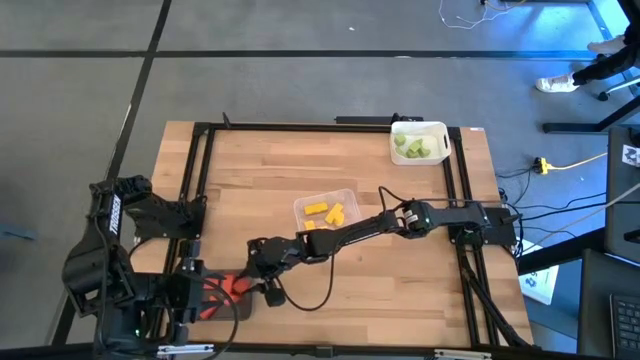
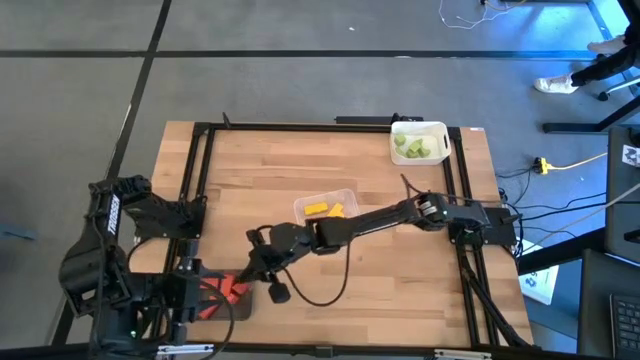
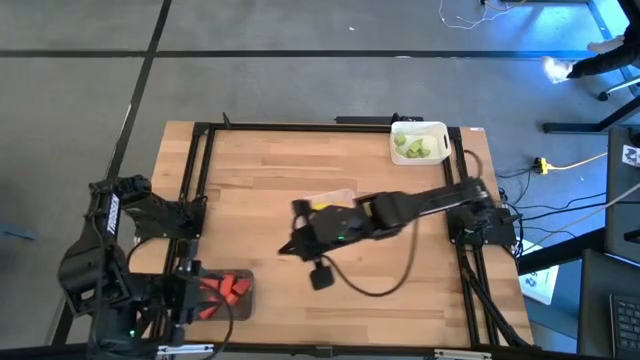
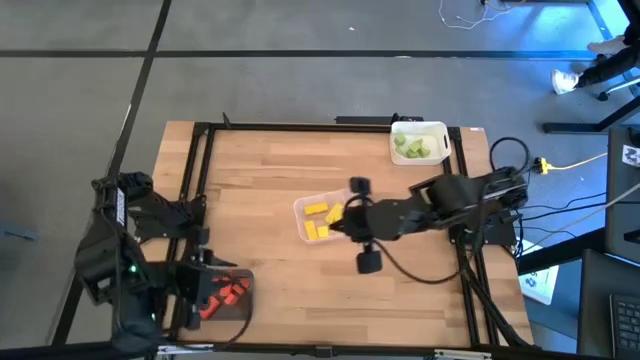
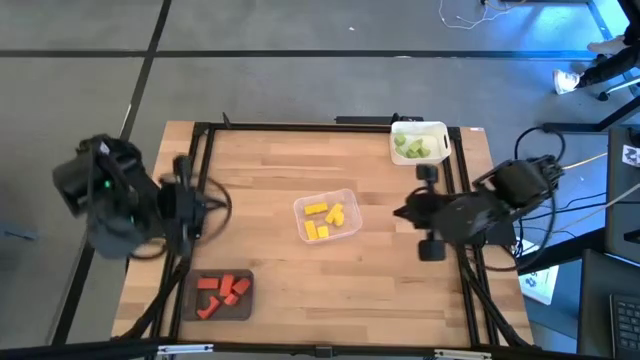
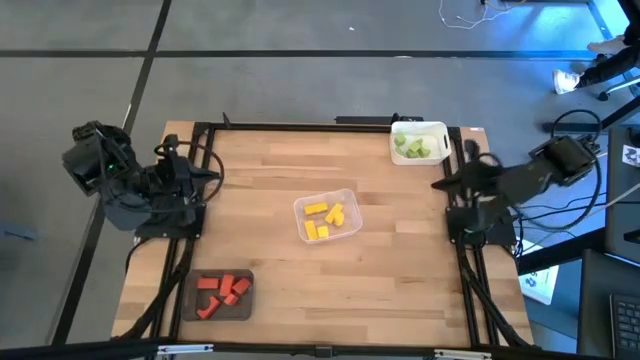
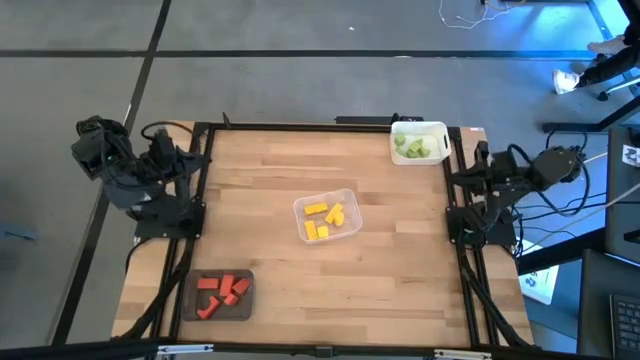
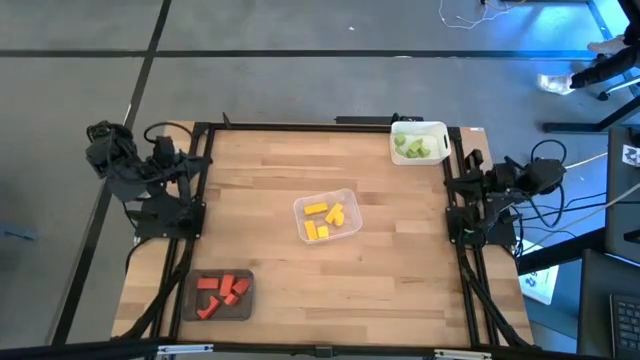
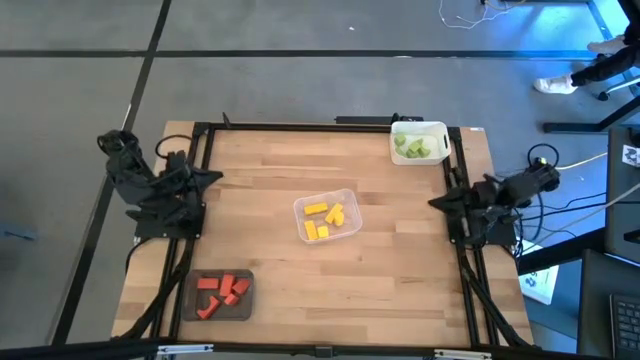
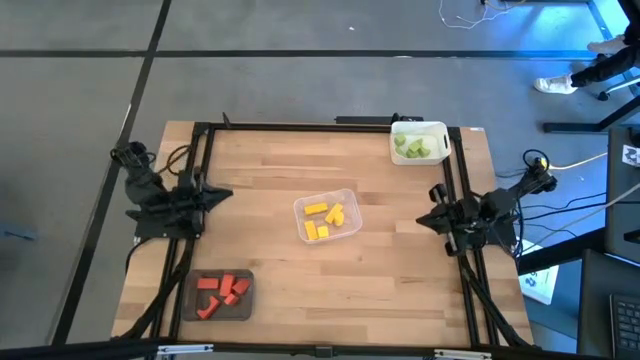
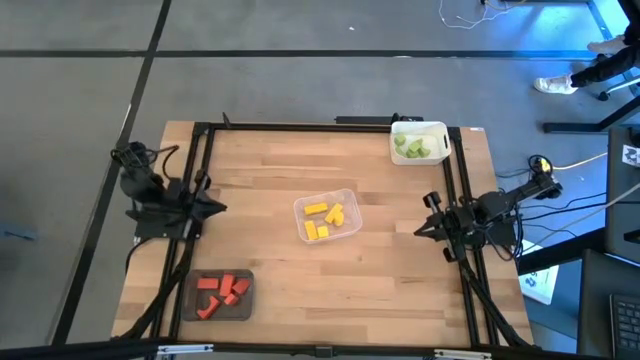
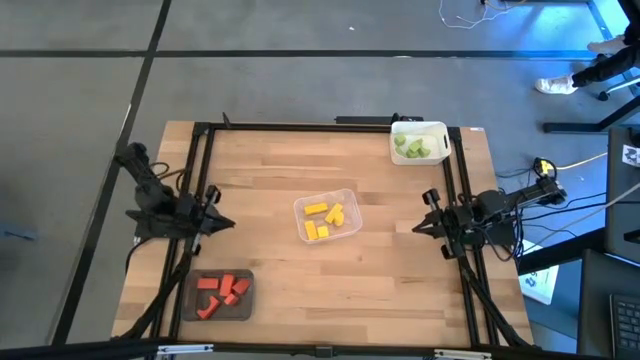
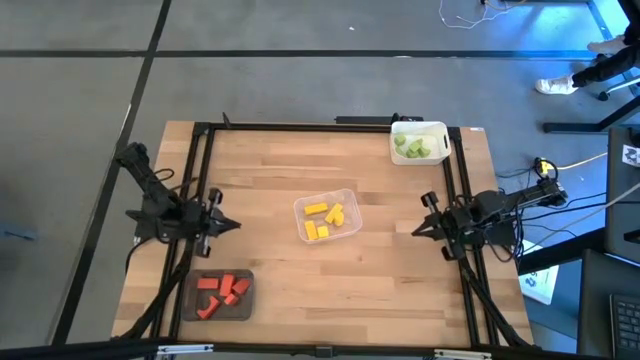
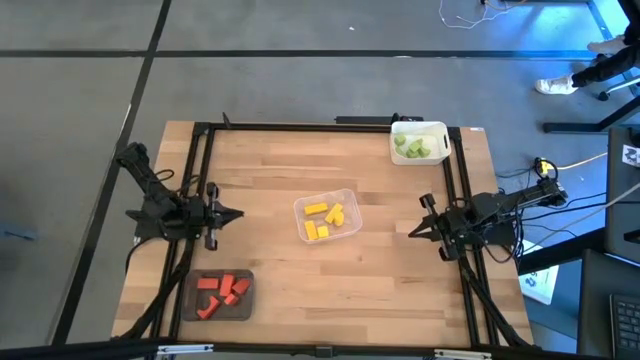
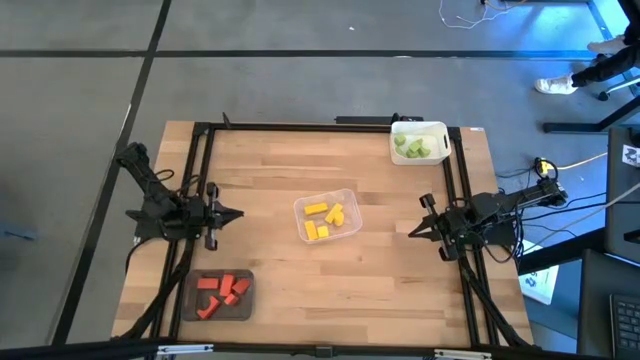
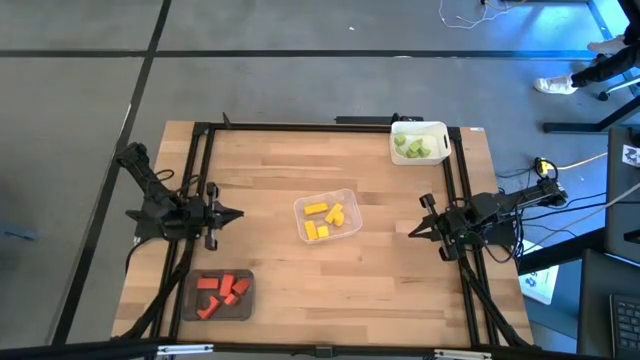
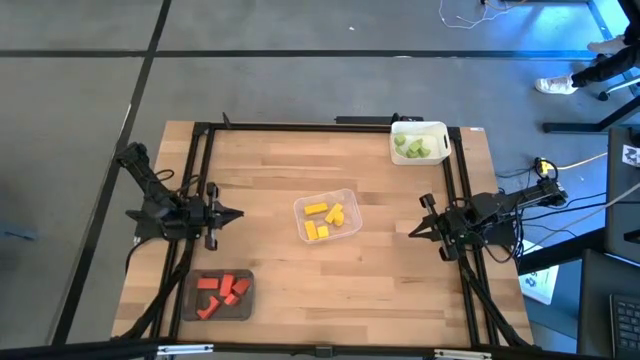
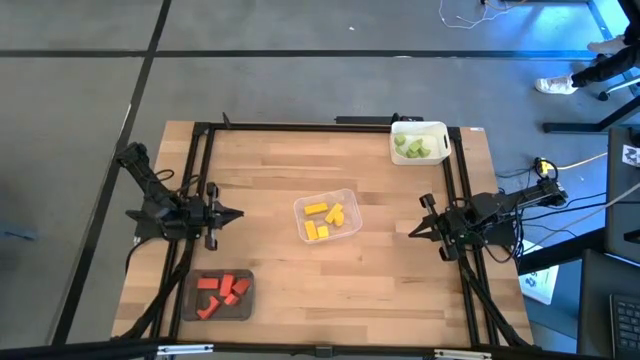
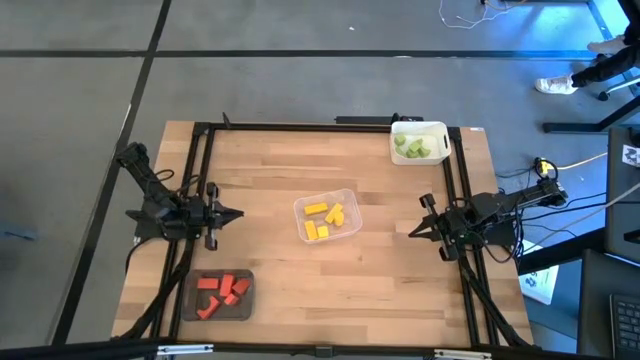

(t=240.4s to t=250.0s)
Task: Sort & place blocks by color
Return to Home Position

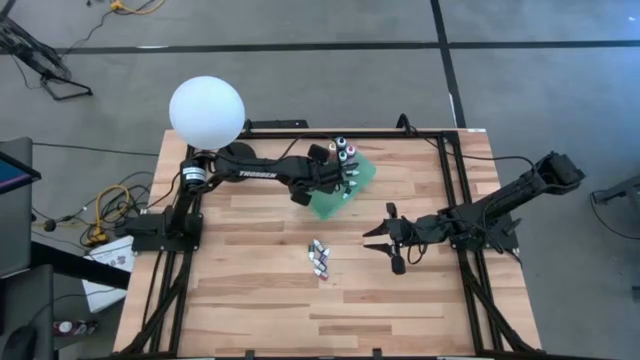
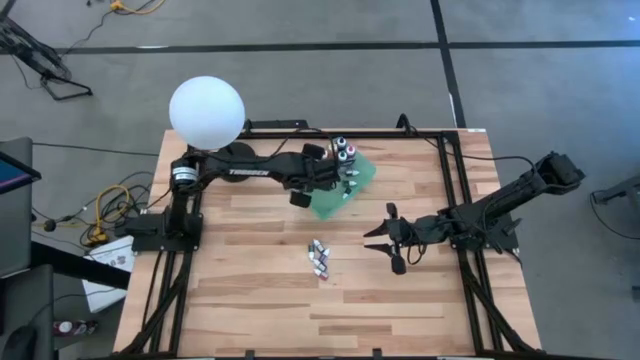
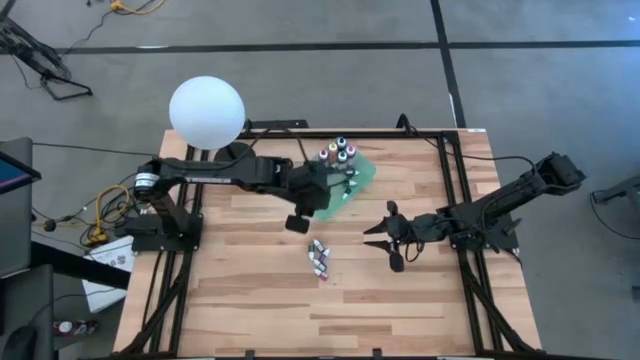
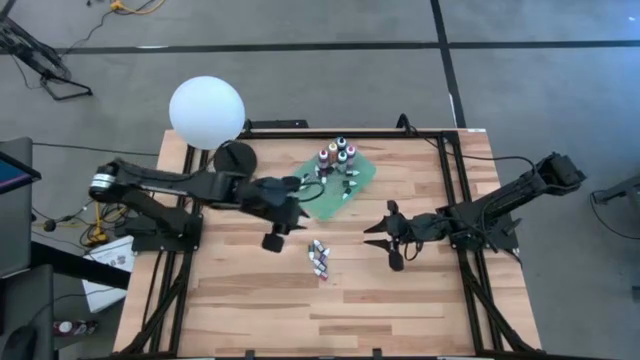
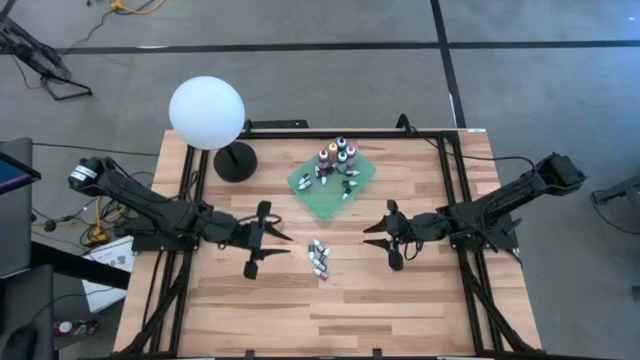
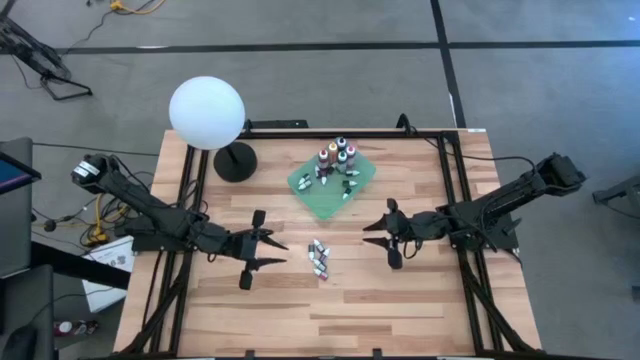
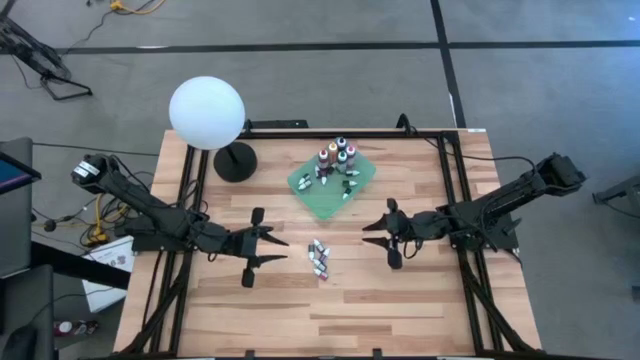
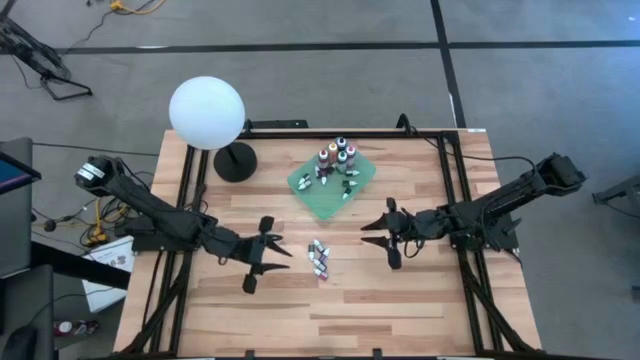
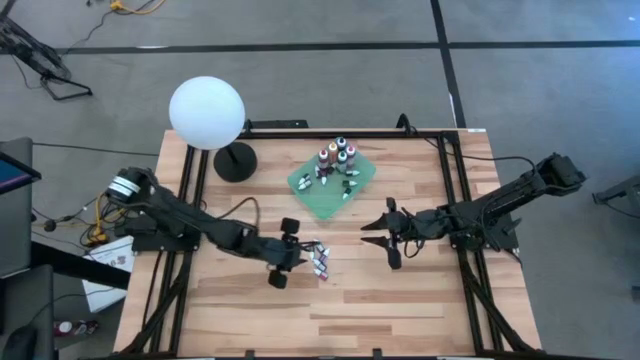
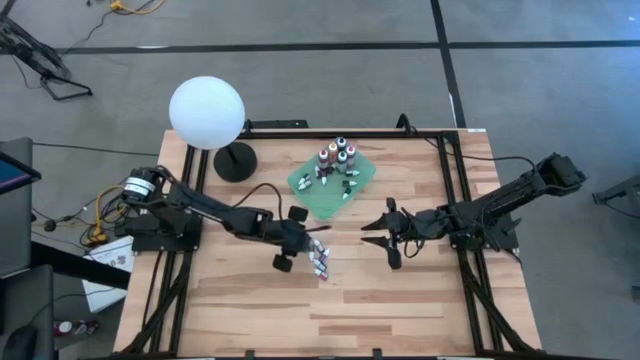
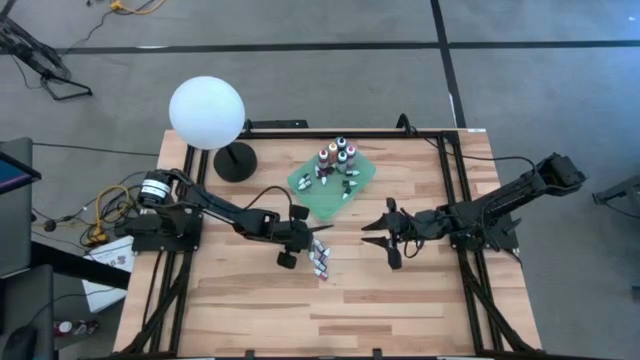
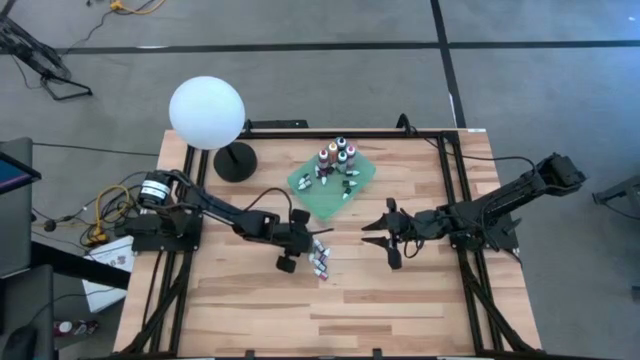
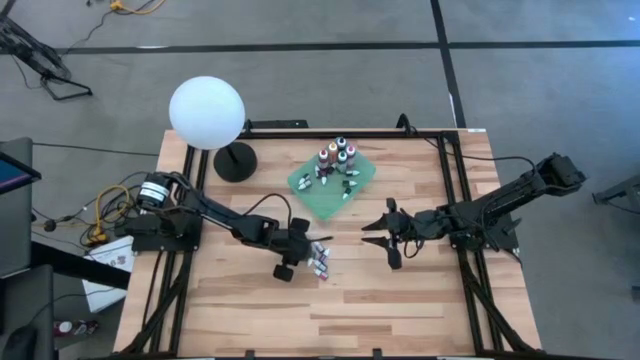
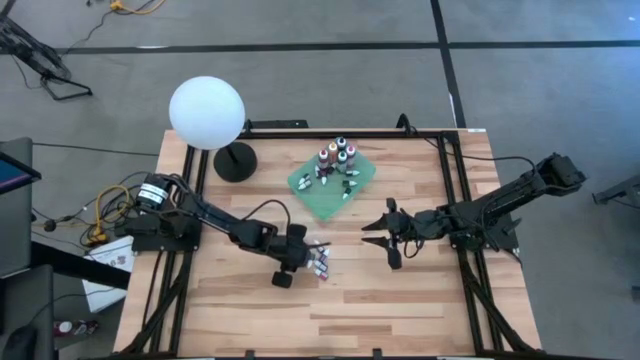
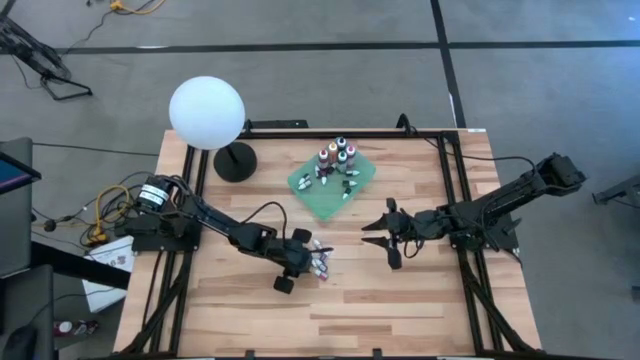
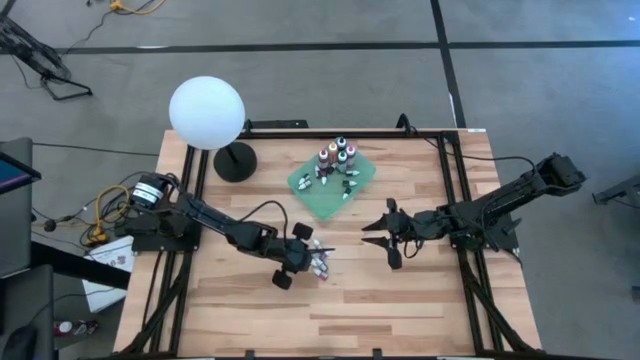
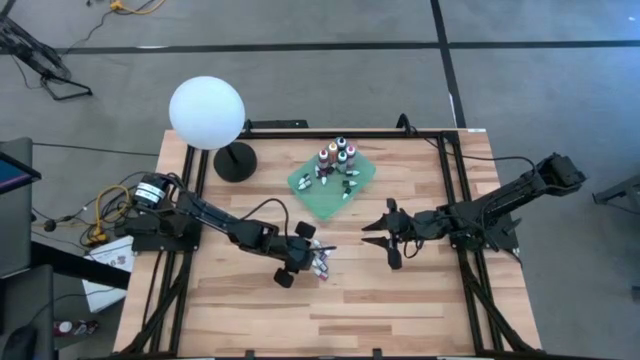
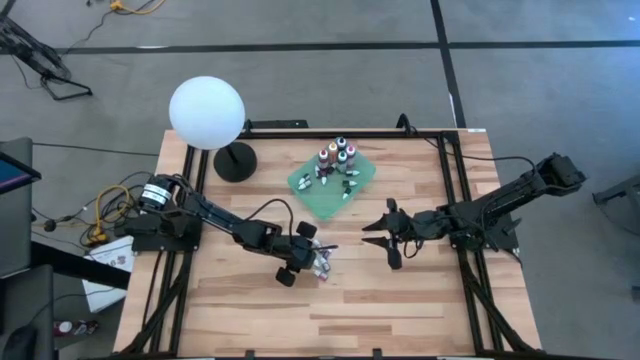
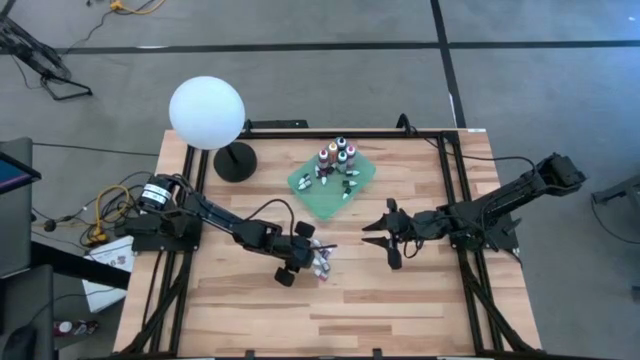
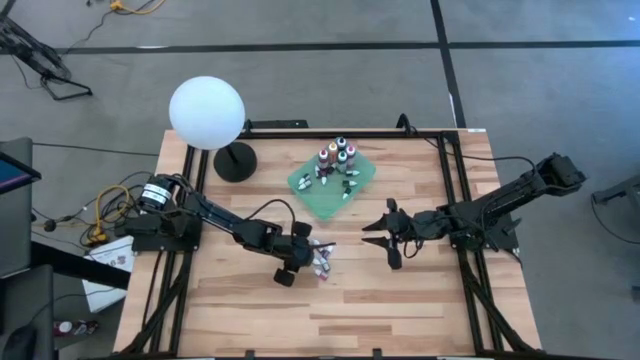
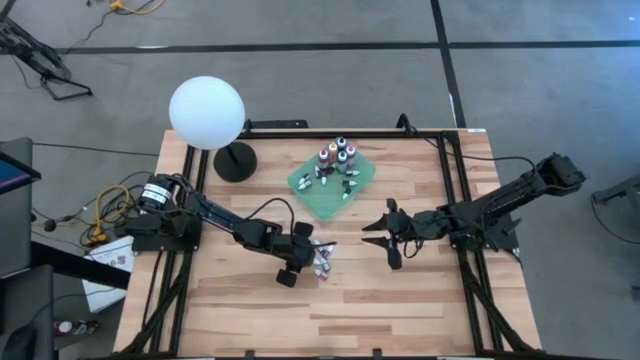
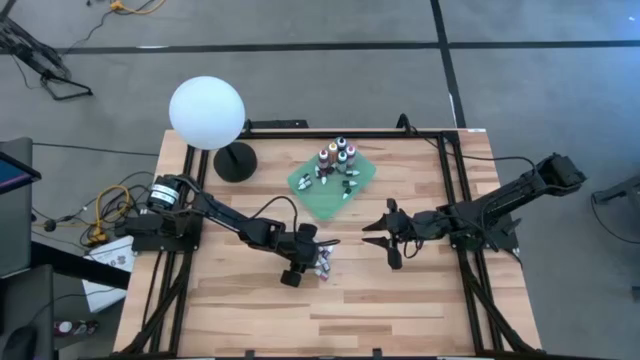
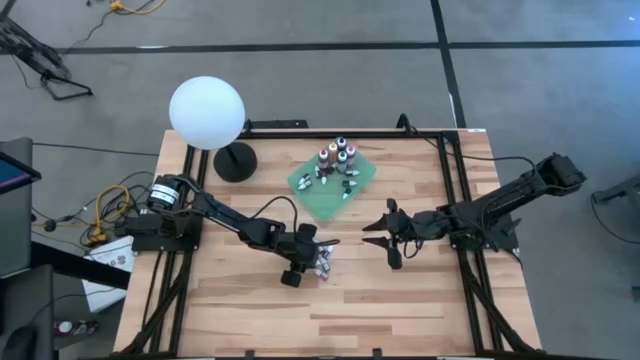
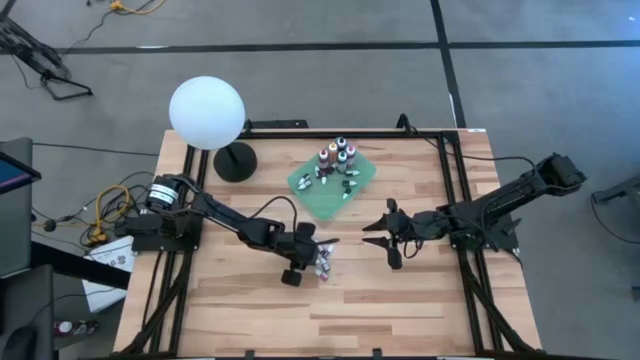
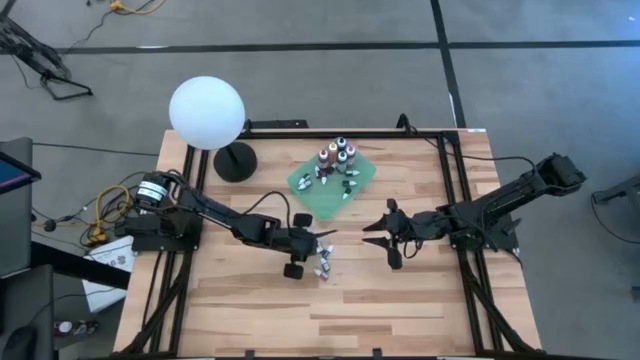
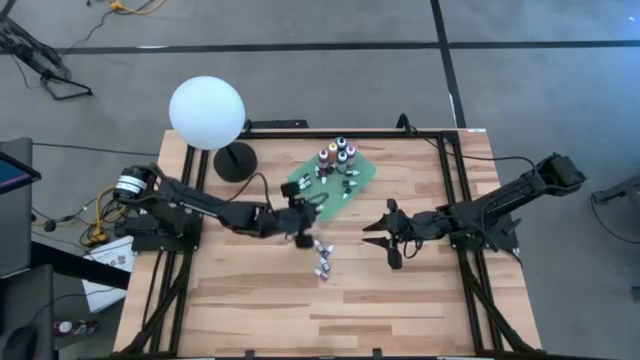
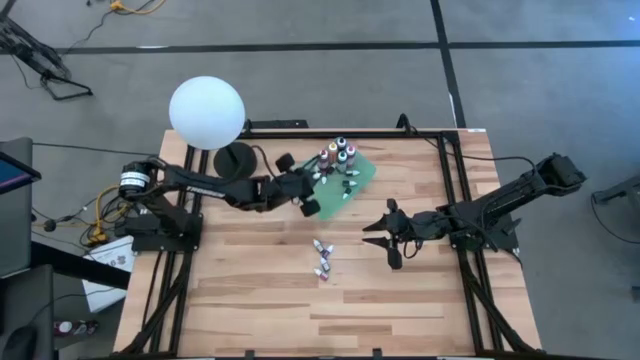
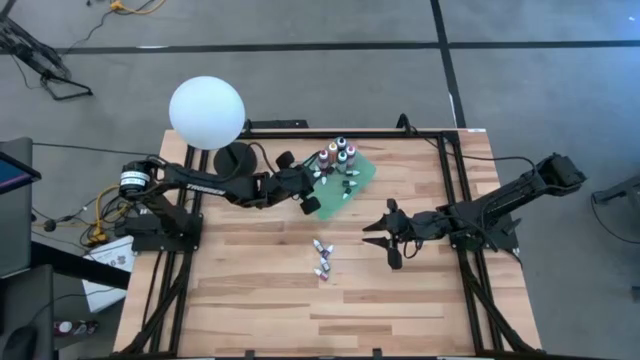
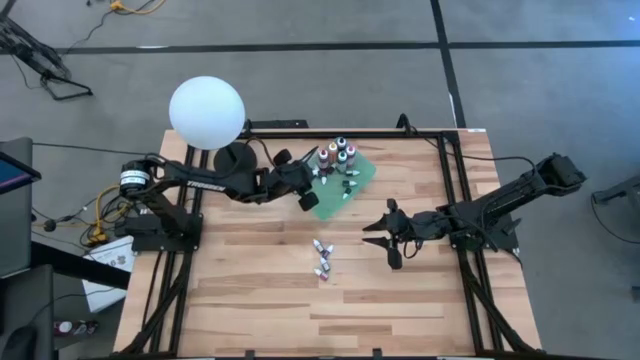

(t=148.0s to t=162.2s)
Task: Pick & Place food coloring
Put the green food coloring bottle into the green bin
